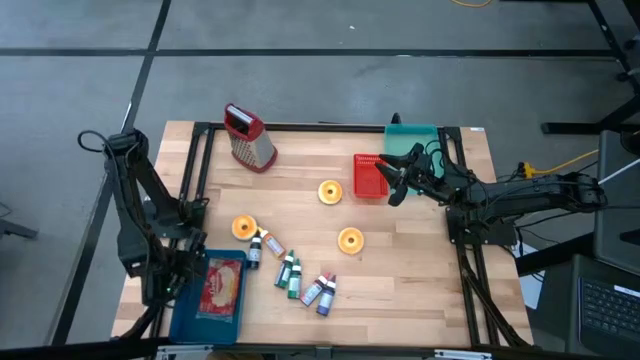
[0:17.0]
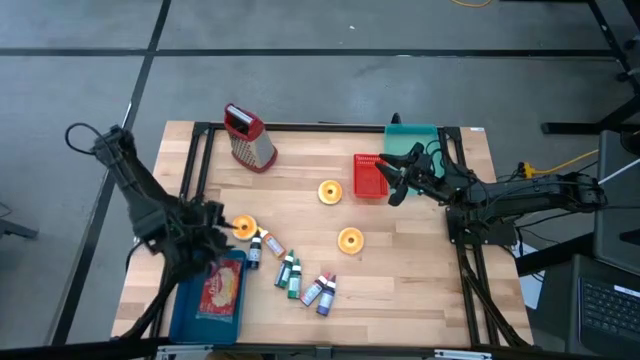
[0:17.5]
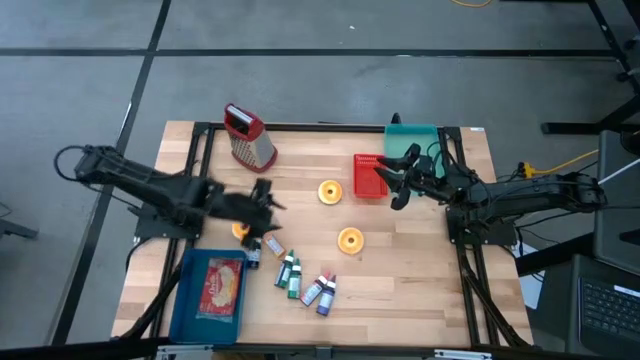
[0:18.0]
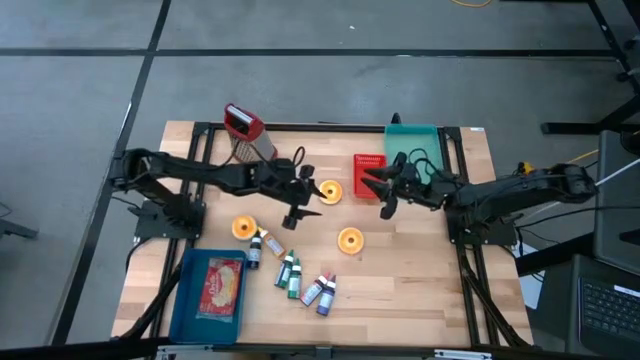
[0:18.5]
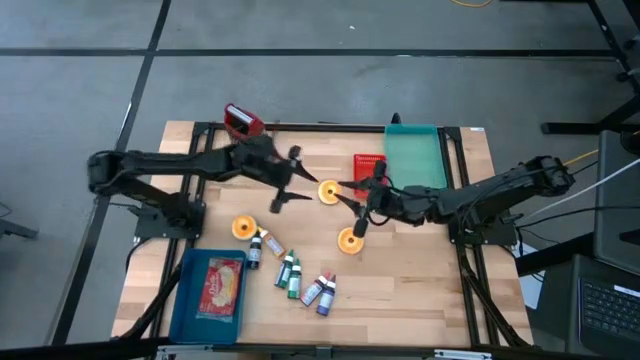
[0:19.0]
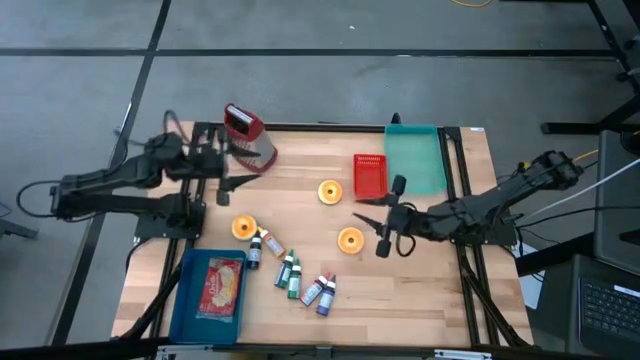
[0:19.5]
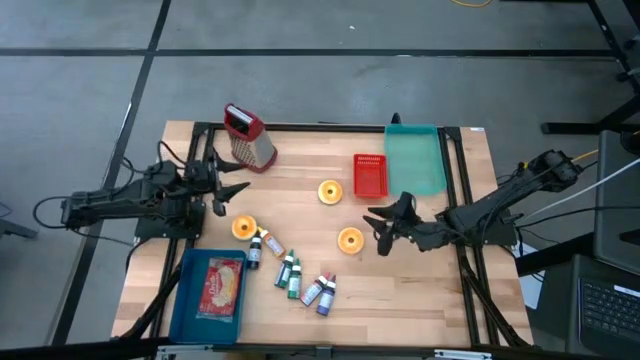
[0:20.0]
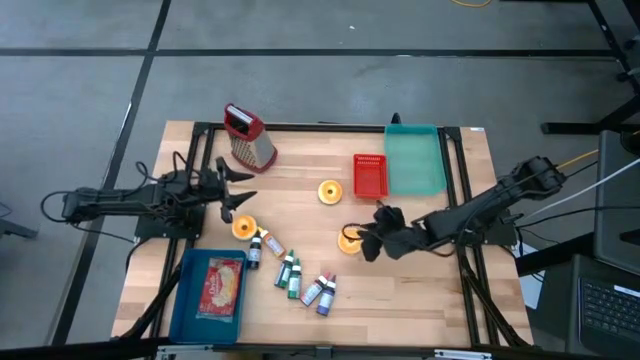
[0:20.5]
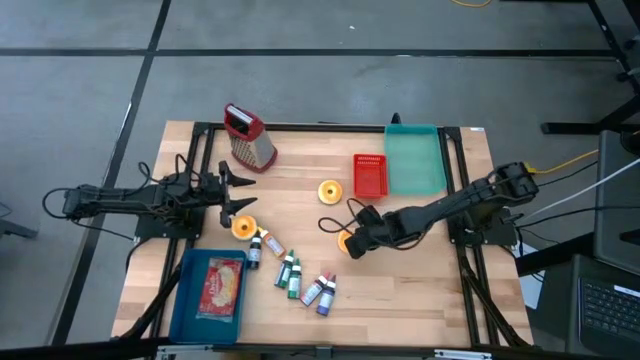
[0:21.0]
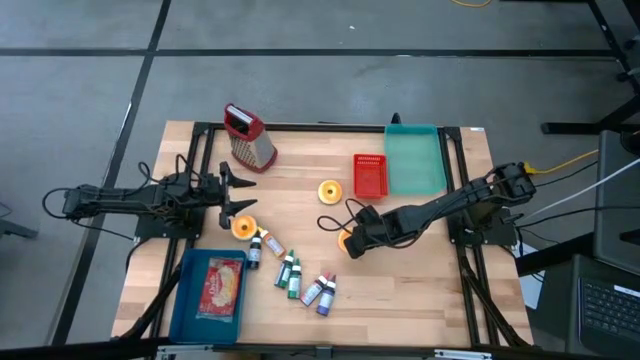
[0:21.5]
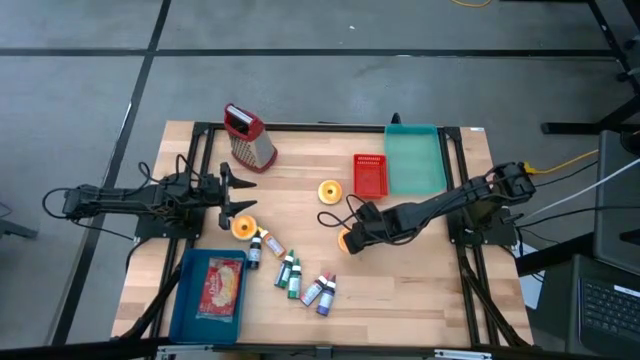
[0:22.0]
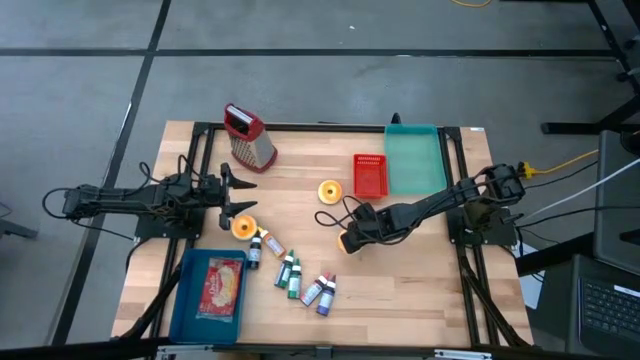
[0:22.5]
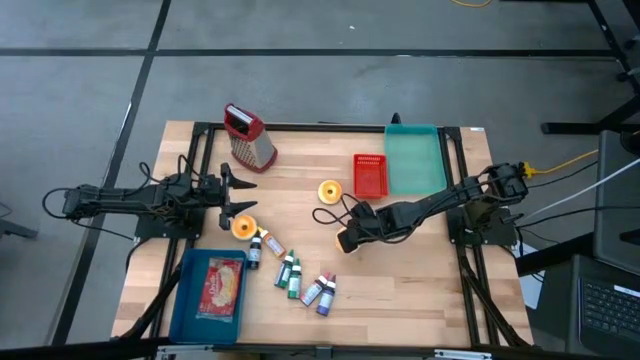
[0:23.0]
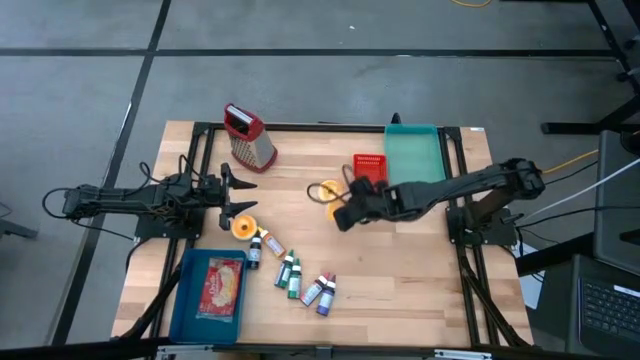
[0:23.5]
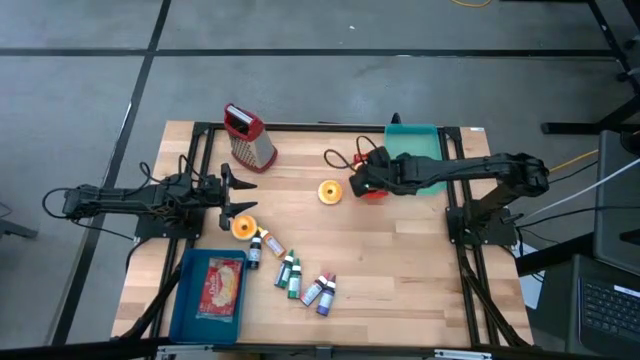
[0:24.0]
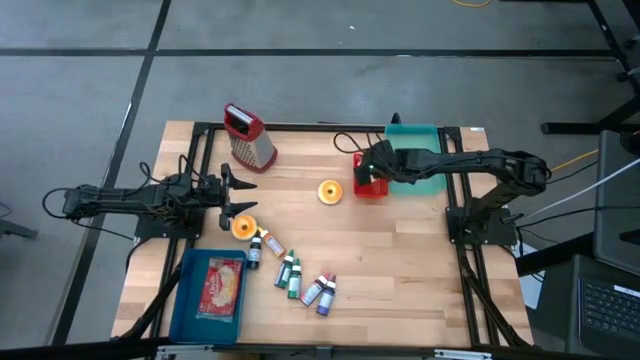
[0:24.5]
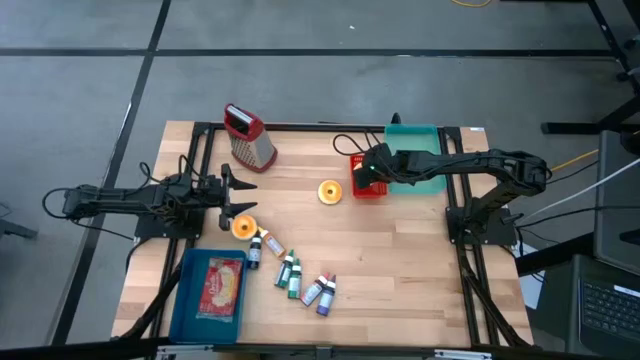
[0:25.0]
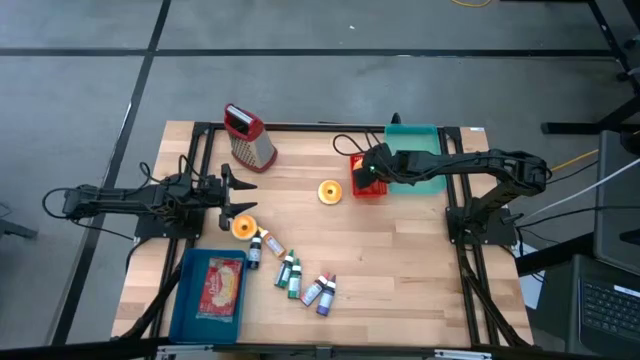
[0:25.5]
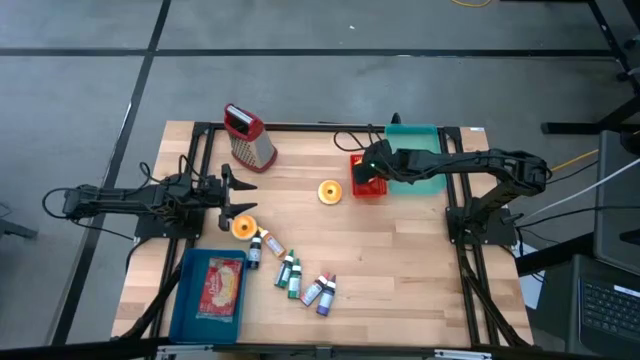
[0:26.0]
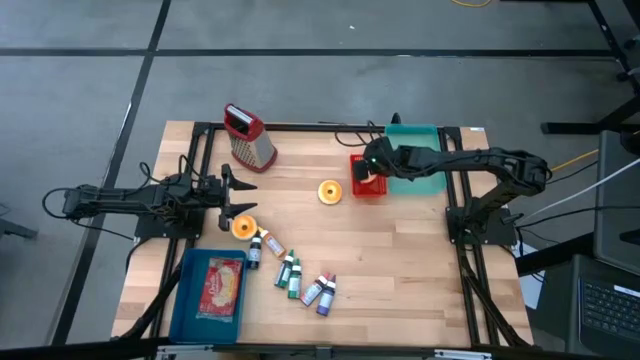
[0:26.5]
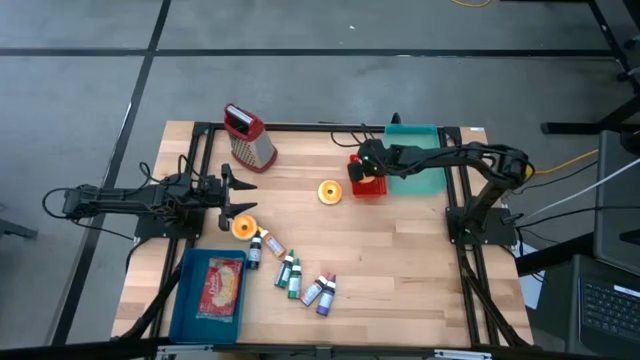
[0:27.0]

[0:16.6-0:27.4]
Put the orange and pink donut into the red bin

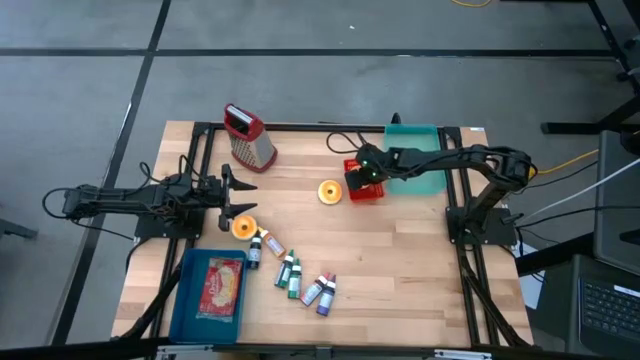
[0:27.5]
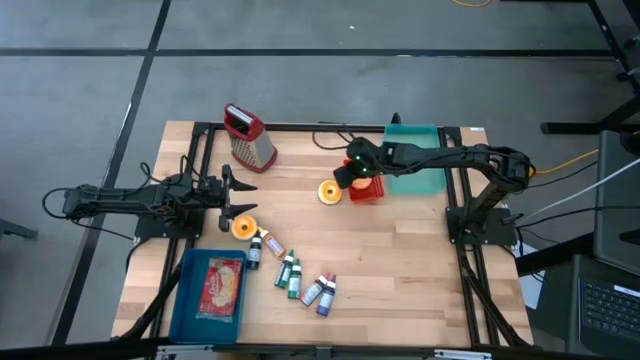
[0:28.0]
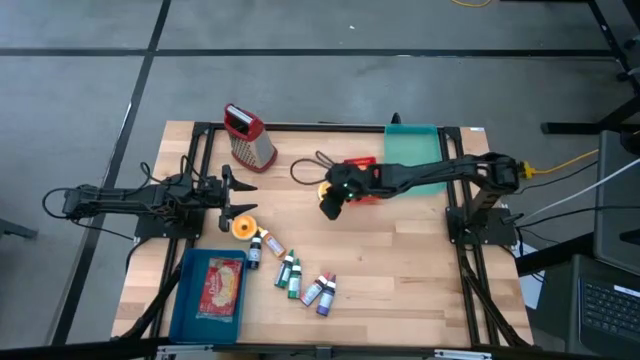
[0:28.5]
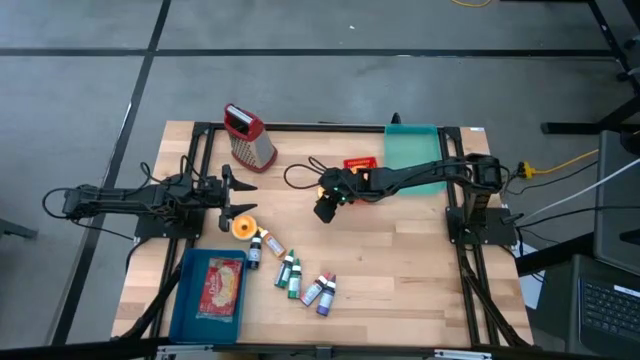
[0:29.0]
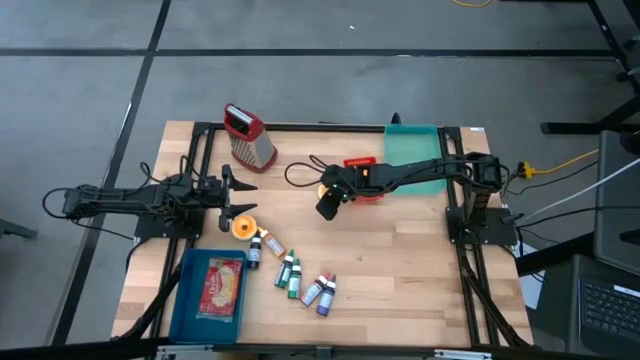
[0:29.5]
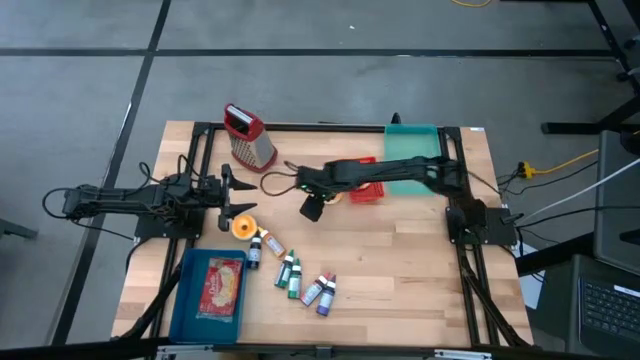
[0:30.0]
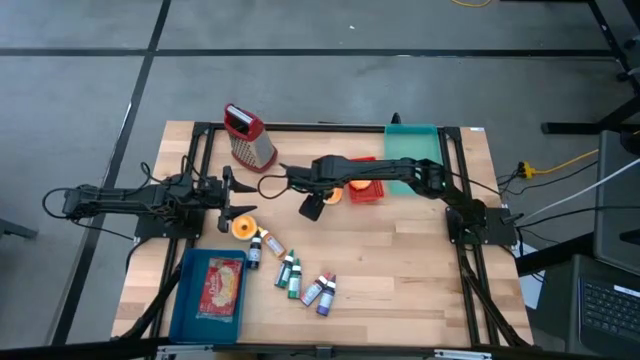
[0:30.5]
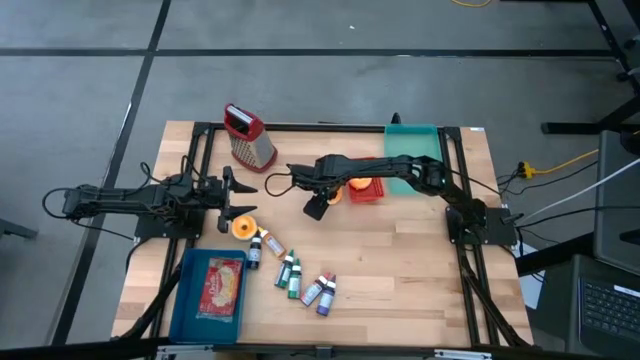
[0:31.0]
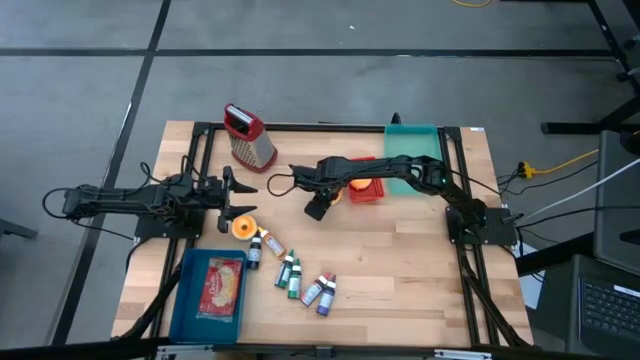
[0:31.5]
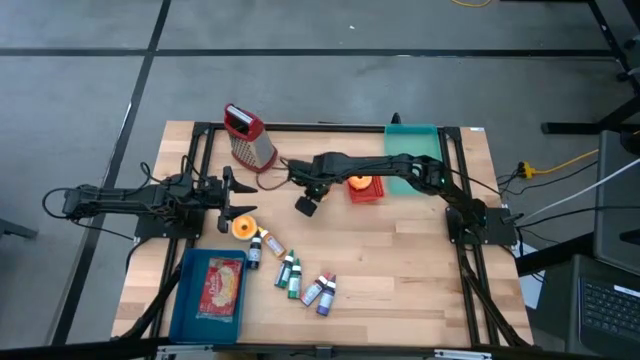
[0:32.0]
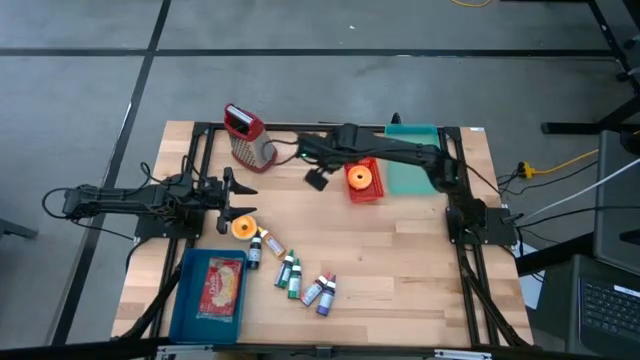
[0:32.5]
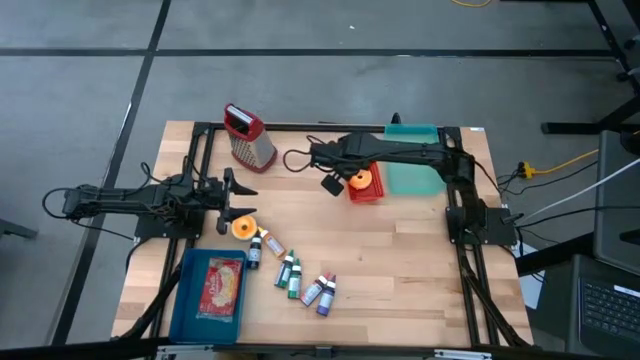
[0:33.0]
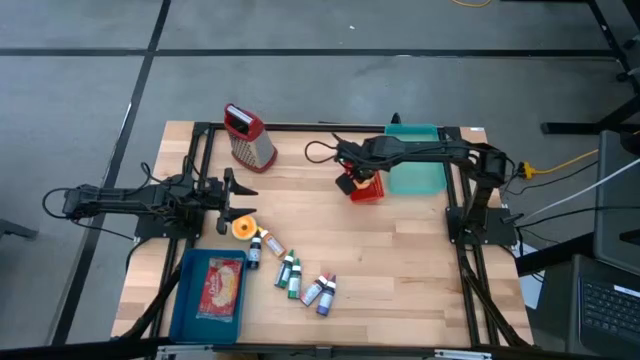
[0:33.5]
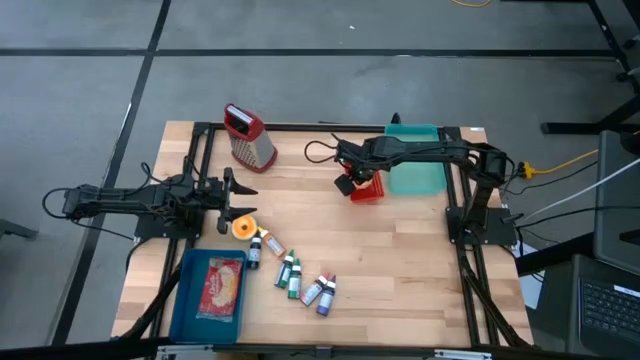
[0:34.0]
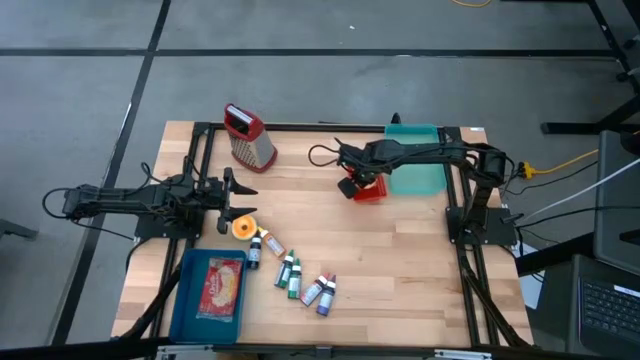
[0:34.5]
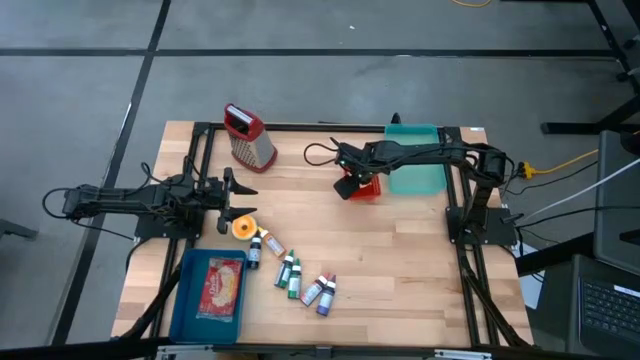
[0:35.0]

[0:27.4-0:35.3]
Put the orange and black donut into the red bin
